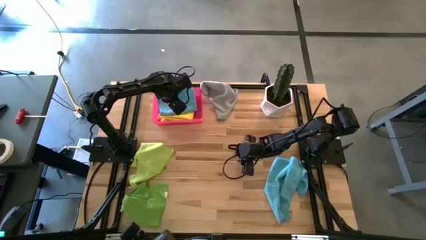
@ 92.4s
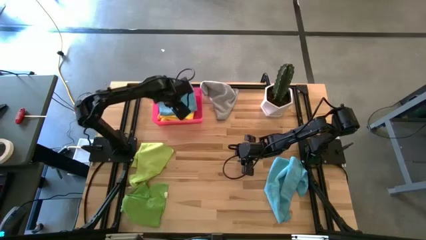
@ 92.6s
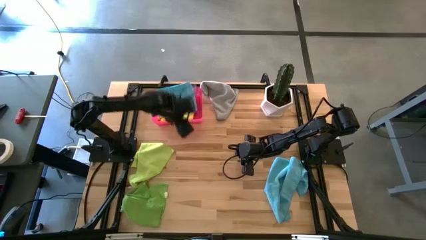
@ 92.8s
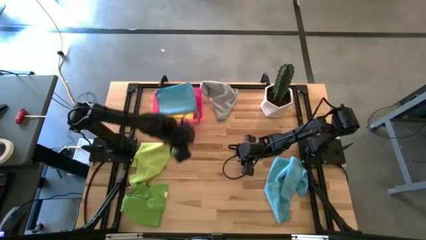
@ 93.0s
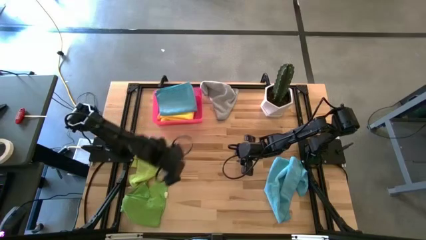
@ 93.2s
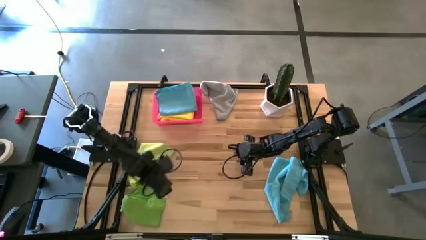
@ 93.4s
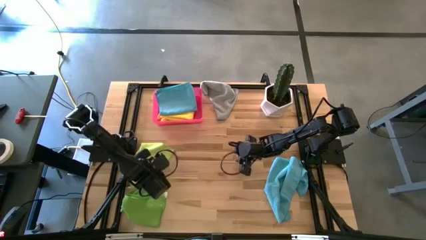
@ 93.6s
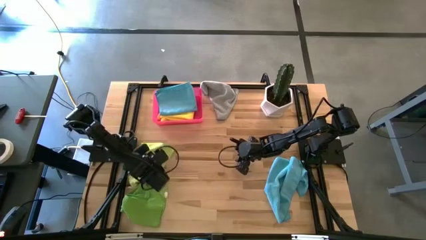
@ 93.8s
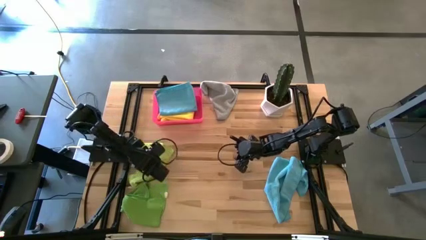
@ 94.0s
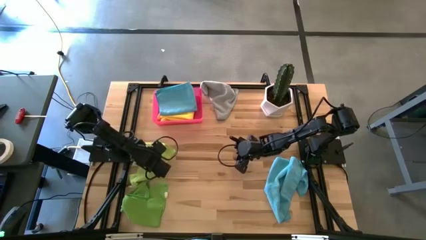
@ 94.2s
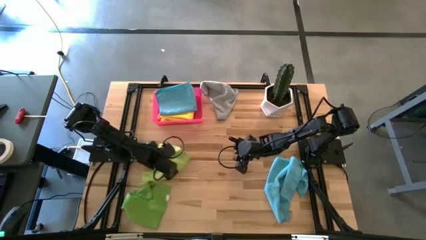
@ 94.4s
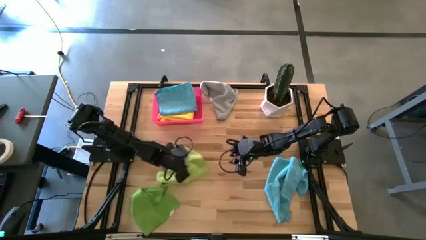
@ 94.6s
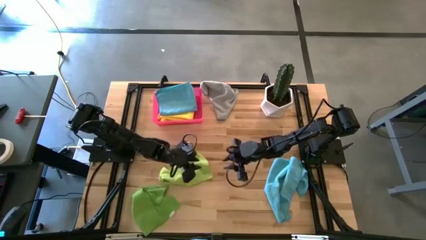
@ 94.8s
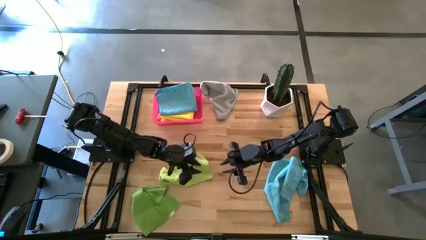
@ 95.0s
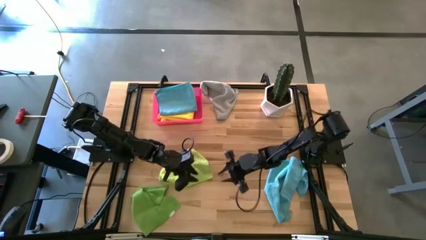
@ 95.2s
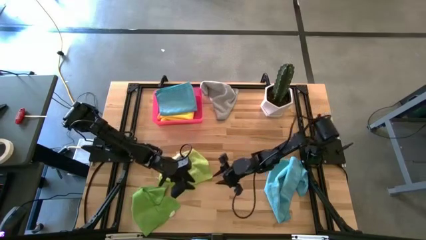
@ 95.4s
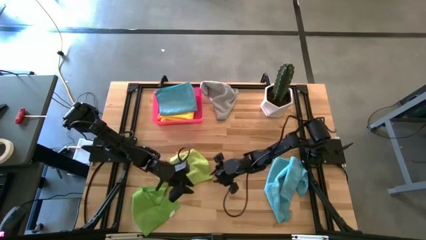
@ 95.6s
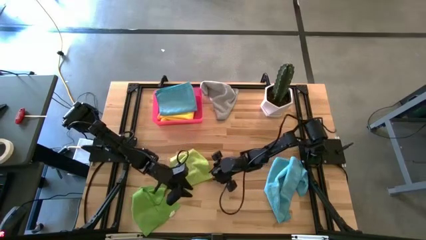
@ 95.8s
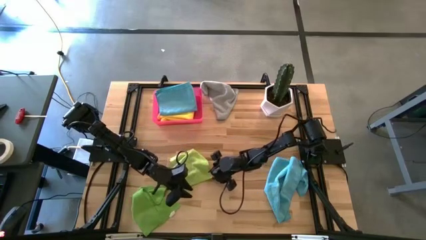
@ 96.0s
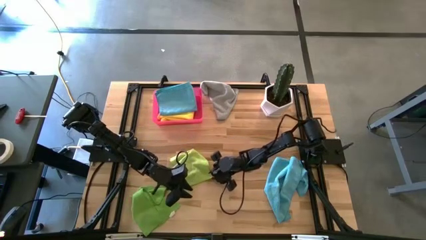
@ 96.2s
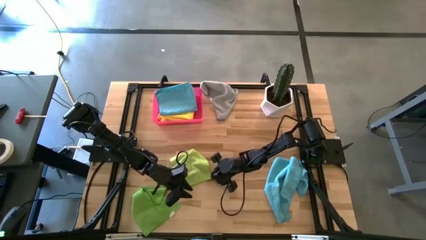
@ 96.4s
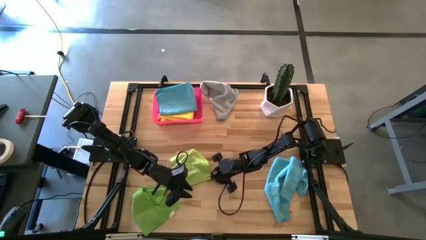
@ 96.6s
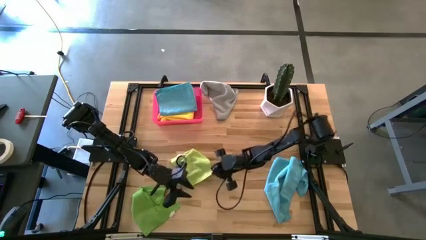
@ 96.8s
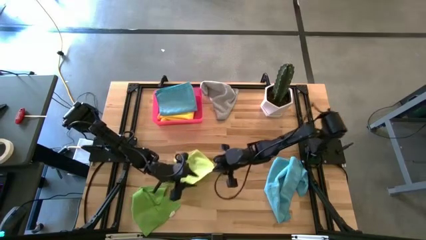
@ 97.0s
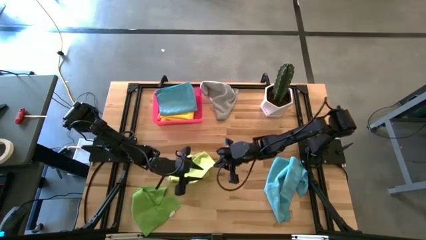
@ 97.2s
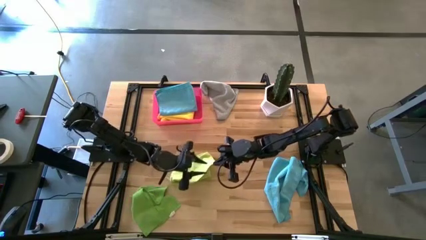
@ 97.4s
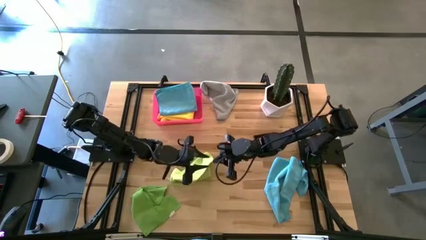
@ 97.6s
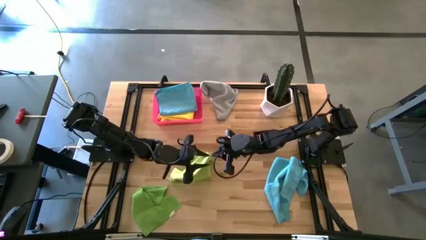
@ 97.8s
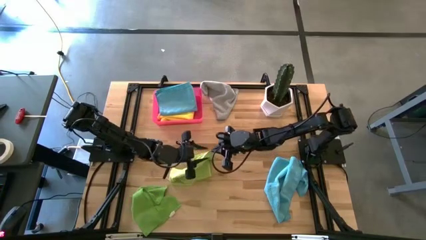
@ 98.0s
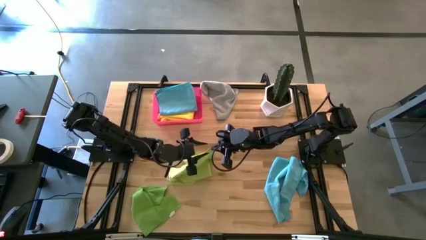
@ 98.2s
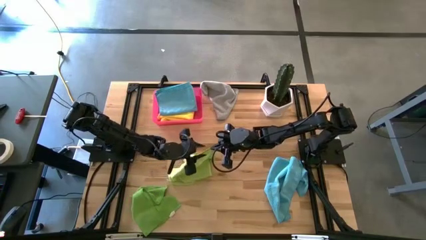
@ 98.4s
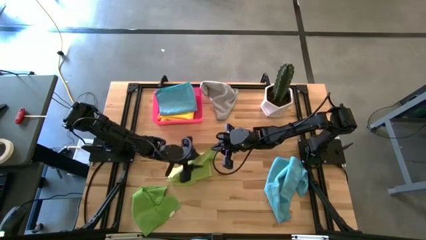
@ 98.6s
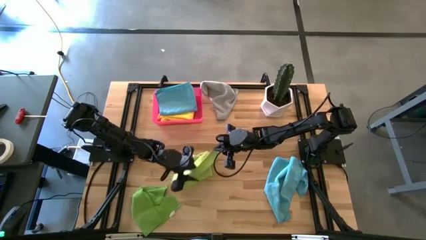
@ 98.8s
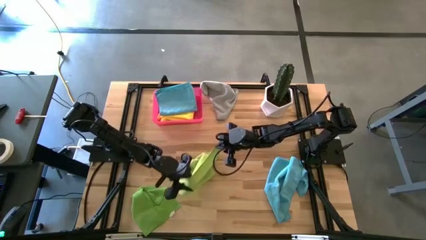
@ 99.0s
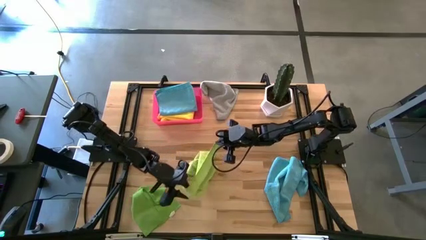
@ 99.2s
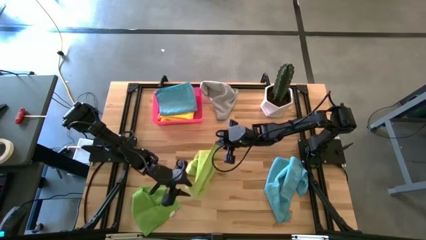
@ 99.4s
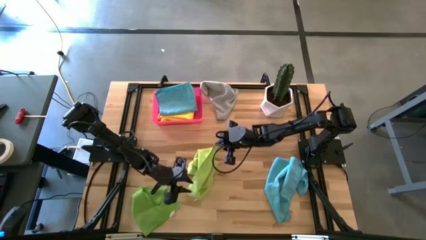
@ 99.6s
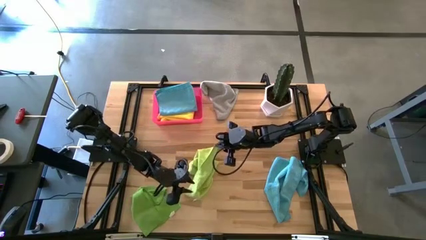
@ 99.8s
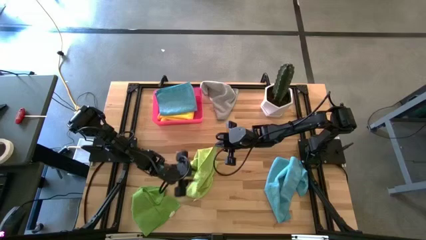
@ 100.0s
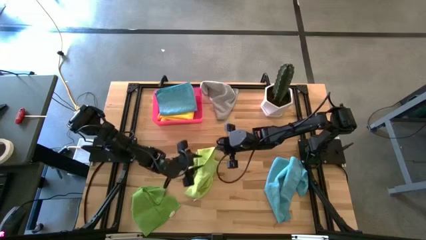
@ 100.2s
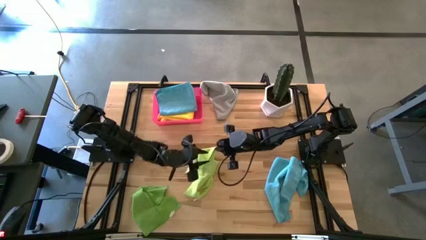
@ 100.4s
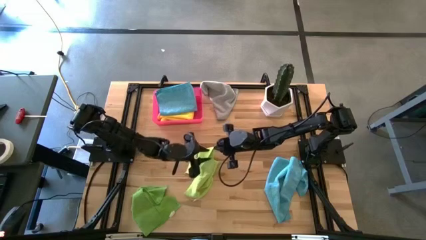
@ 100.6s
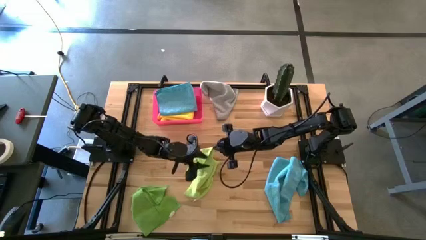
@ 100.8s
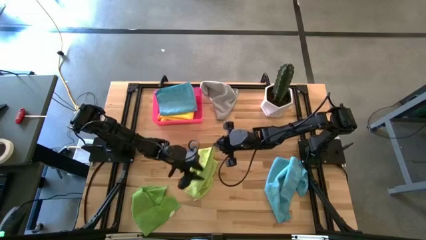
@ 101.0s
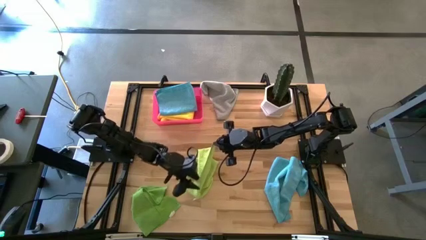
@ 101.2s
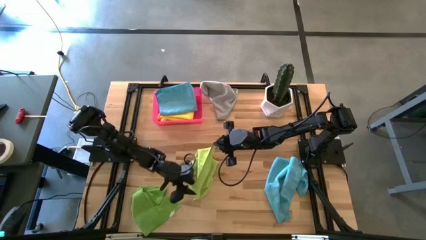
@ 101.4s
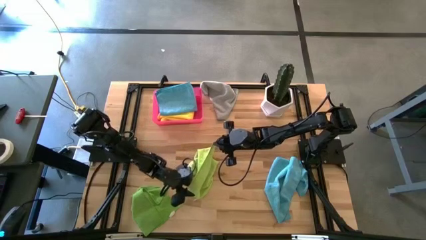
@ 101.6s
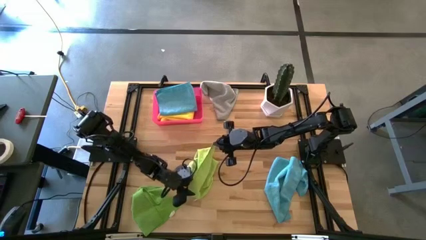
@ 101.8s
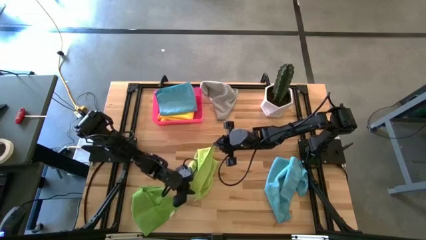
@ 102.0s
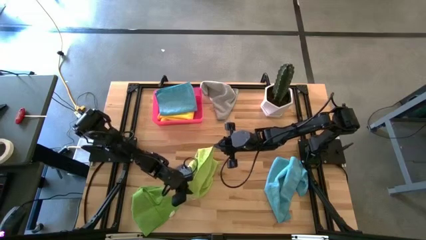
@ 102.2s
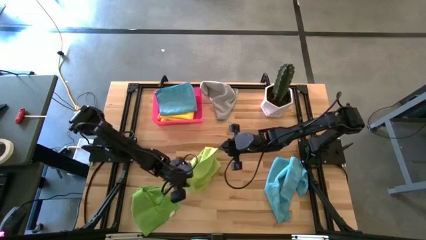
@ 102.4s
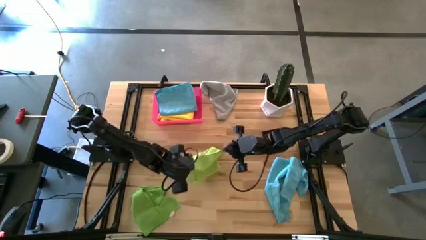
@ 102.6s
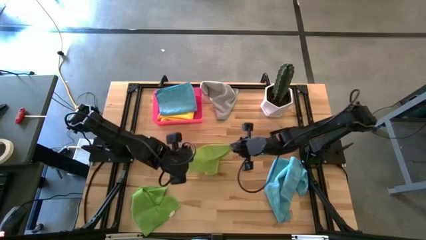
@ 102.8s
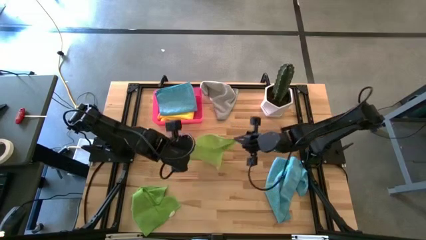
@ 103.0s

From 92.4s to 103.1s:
Task: Fold microfiber towels
Fold the light green towel on the table

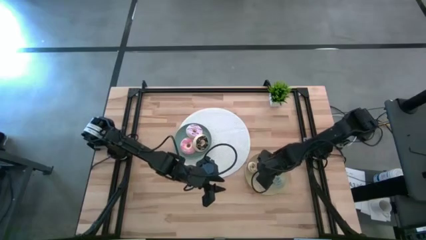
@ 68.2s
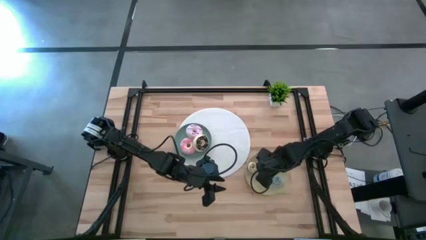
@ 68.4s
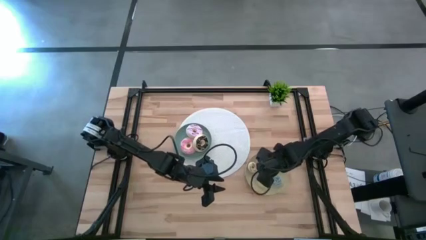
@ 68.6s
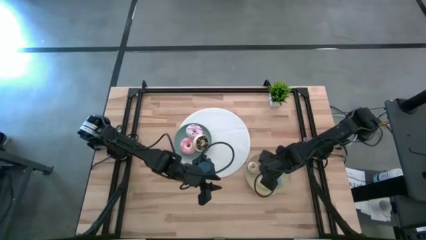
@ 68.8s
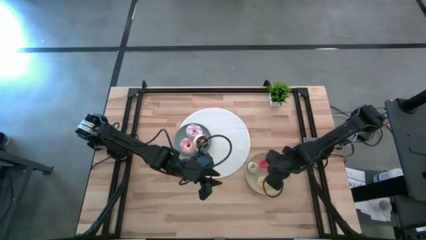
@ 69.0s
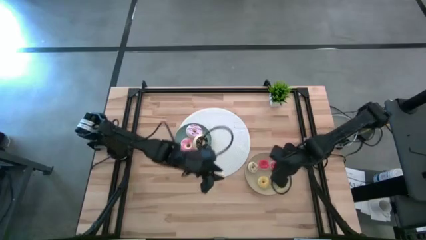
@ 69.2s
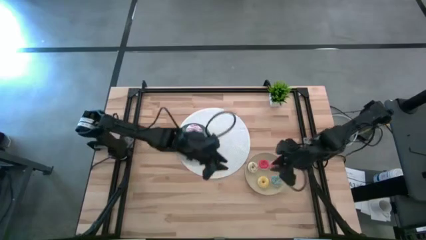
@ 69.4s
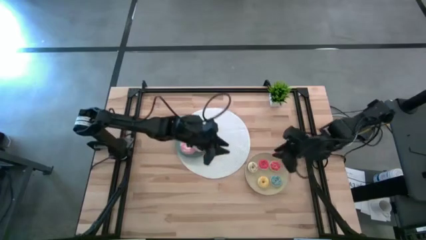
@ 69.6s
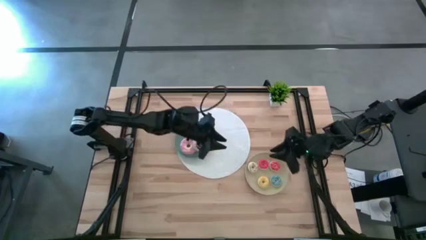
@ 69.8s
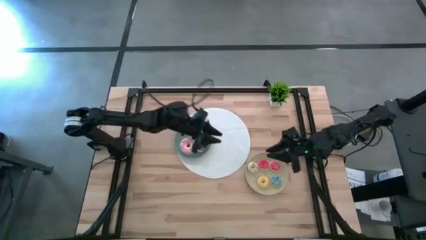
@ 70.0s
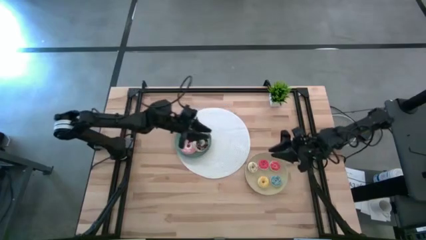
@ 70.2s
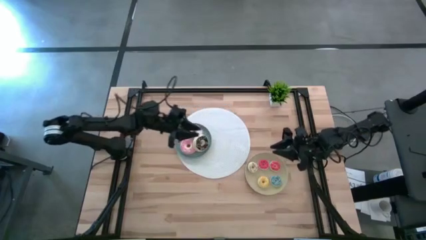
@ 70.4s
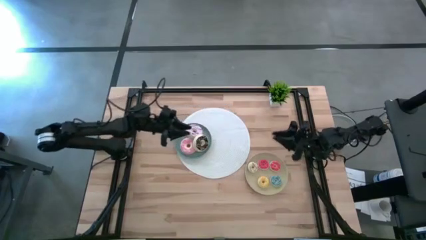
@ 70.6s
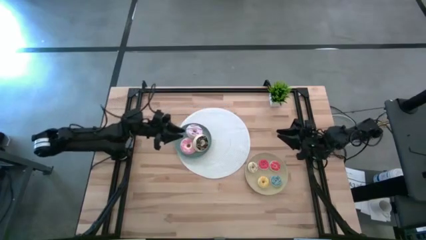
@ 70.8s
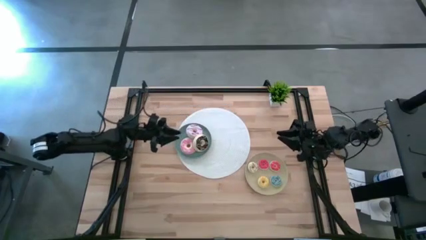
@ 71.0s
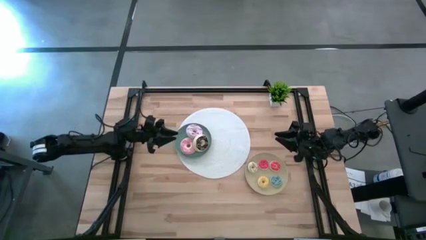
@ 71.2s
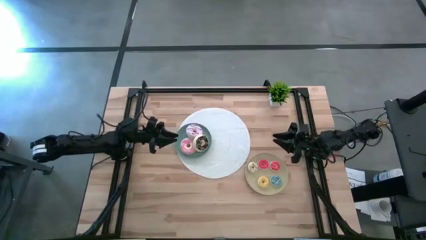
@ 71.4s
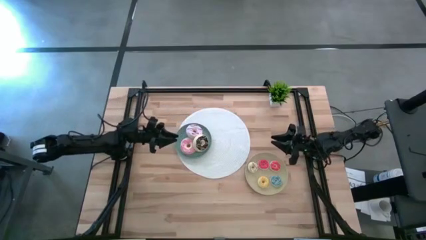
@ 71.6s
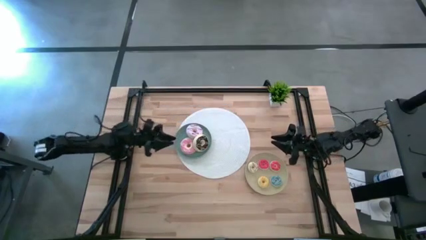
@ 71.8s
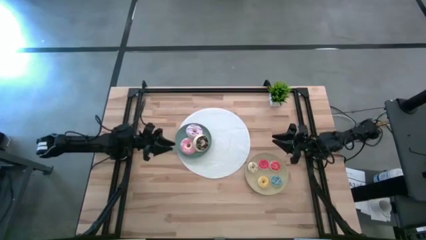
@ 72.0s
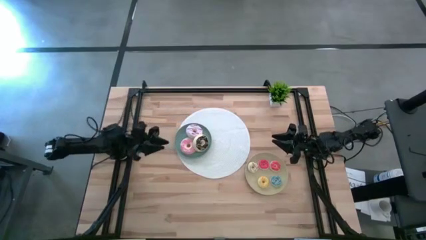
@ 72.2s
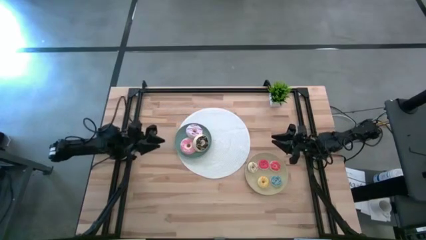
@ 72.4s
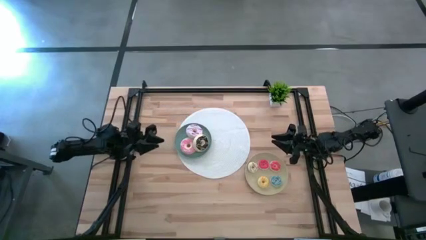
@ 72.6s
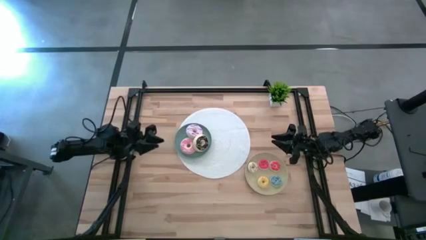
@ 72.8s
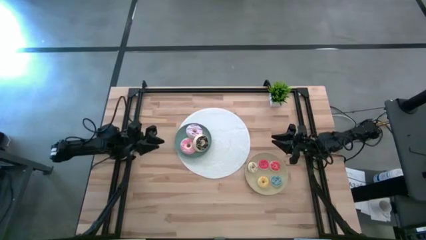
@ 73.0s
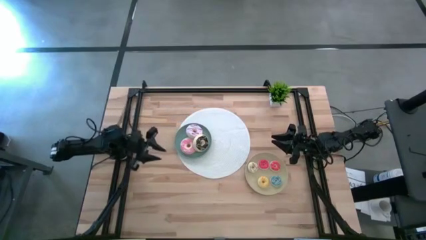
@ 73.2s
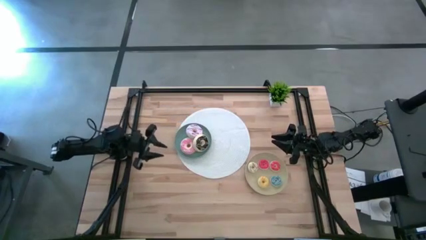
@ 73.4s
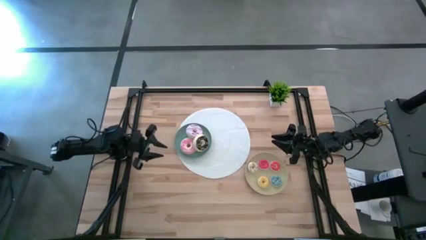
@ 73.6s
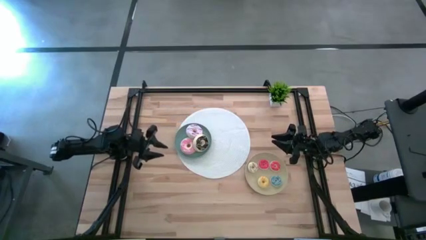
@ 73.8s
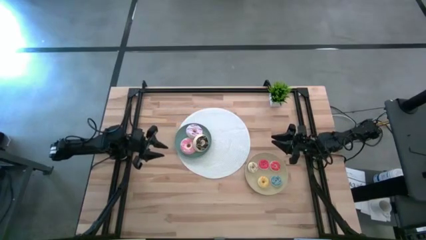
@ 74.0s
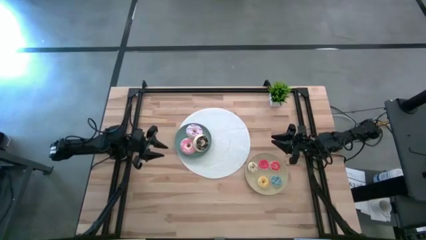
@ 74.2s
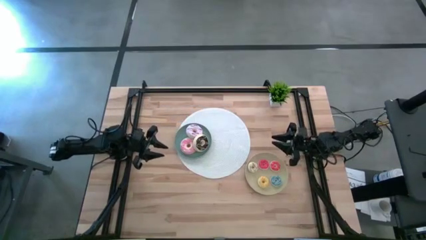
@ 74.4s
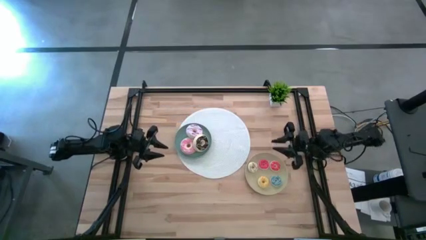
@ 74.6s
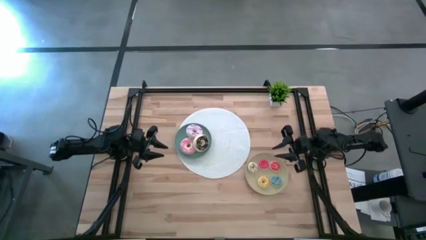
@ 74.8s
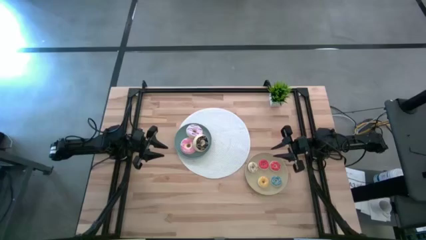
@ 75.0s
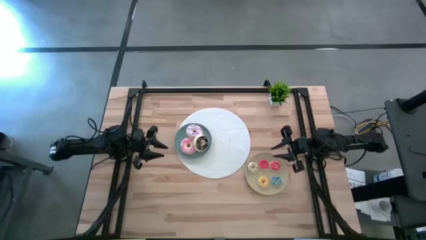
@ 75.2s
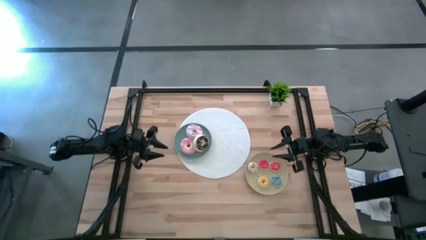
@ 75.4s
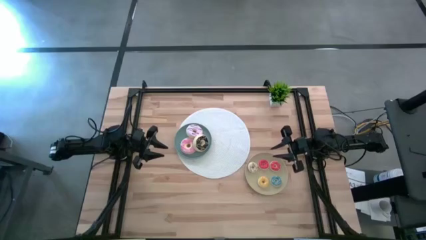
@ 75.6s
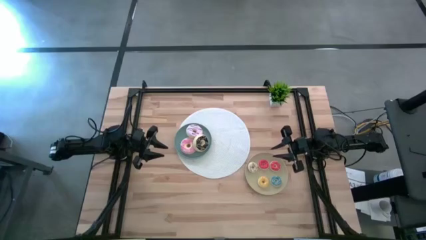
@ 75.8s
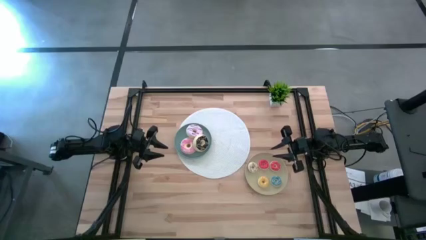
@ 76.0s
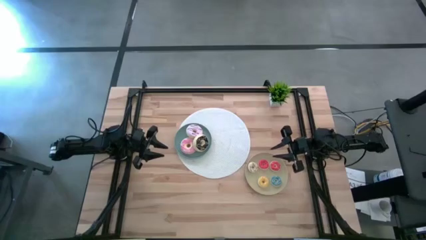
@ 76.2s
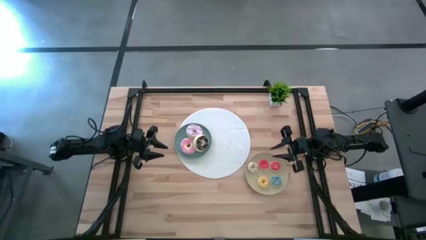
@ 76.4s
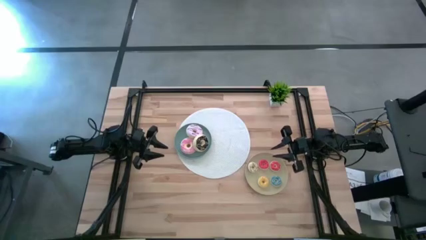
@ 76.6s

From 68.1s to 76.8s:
Task: Pick & Place donuts
Return to Home Position
